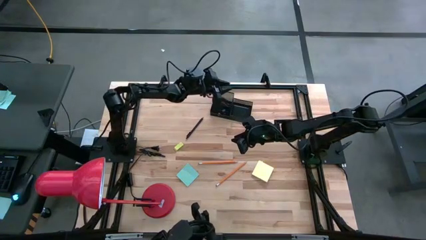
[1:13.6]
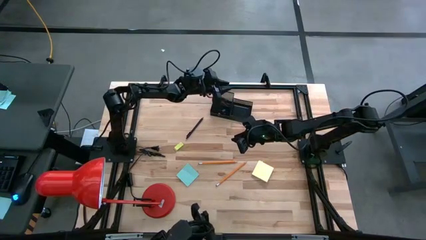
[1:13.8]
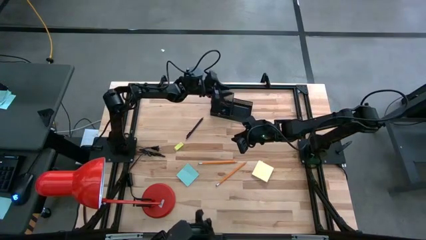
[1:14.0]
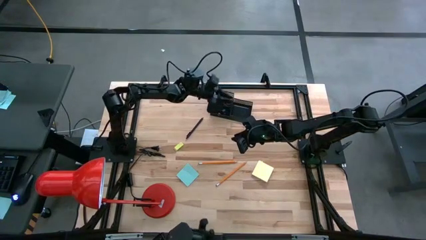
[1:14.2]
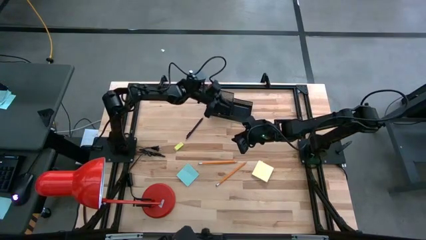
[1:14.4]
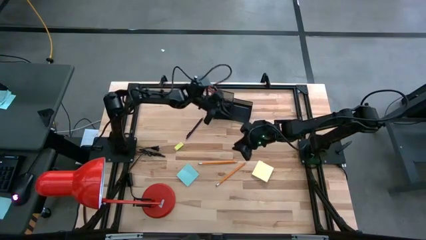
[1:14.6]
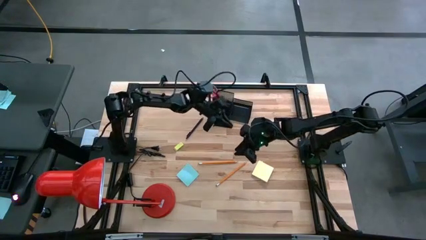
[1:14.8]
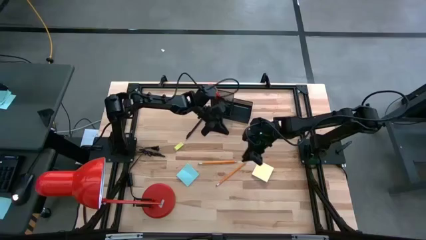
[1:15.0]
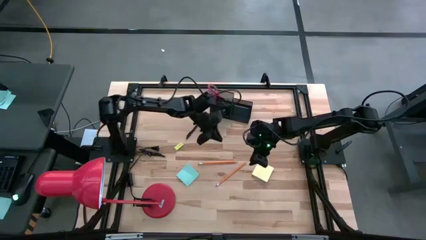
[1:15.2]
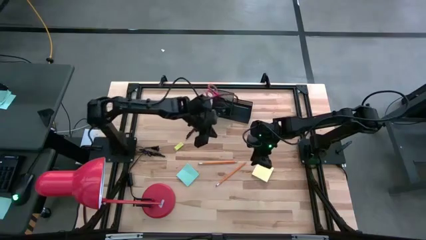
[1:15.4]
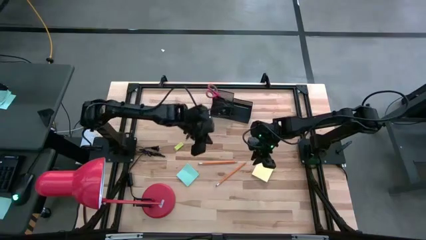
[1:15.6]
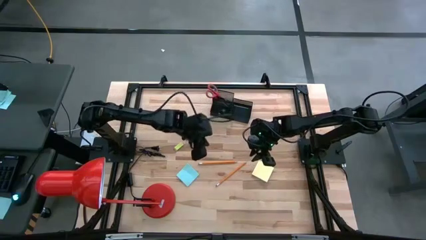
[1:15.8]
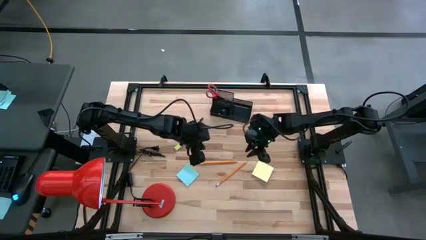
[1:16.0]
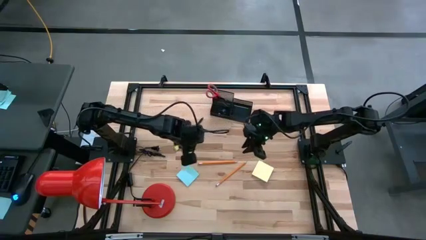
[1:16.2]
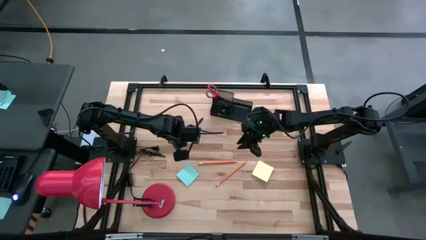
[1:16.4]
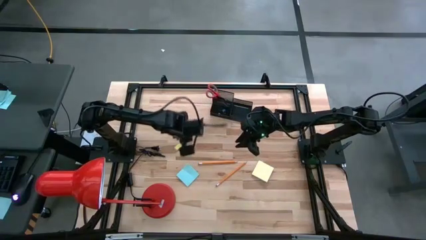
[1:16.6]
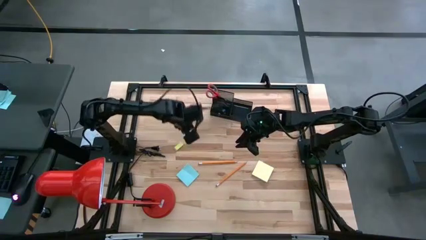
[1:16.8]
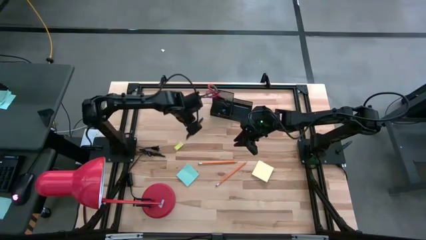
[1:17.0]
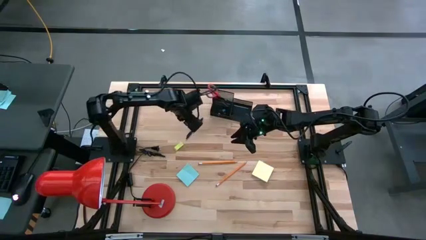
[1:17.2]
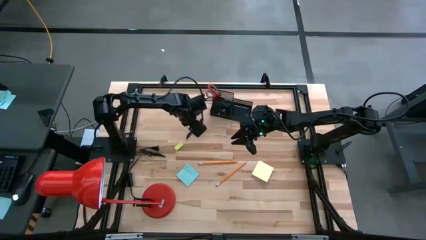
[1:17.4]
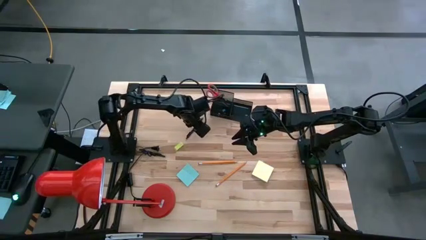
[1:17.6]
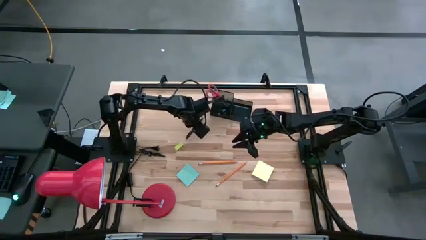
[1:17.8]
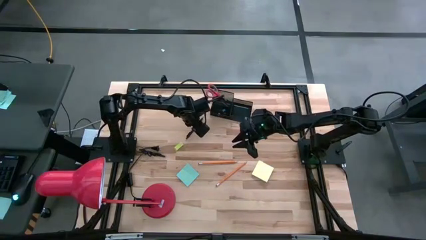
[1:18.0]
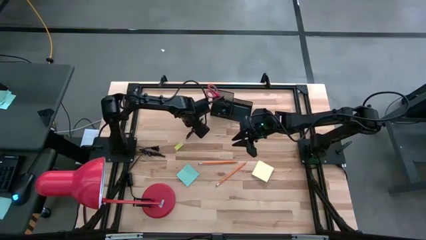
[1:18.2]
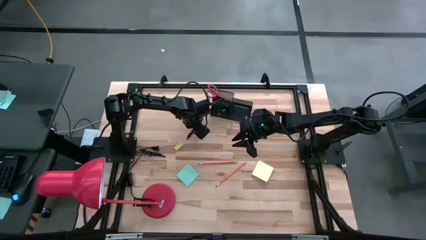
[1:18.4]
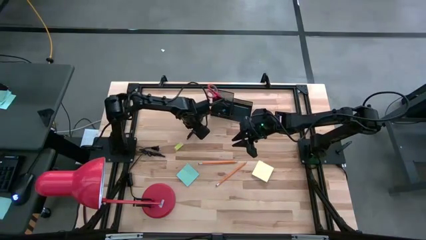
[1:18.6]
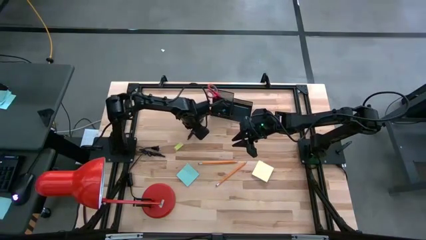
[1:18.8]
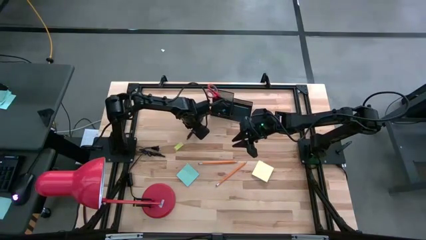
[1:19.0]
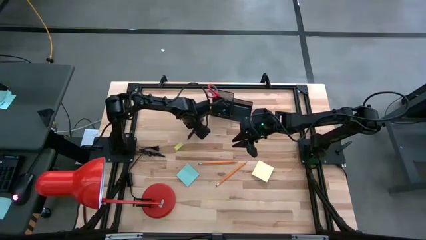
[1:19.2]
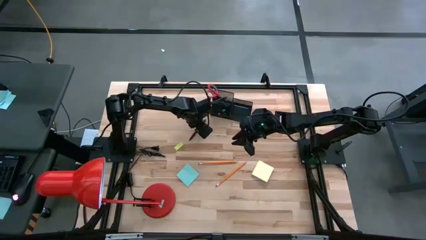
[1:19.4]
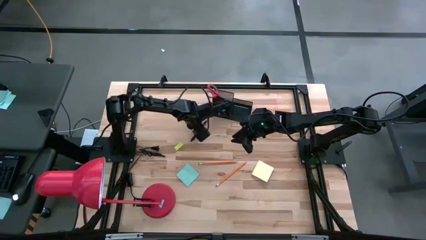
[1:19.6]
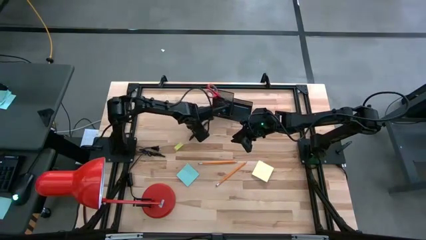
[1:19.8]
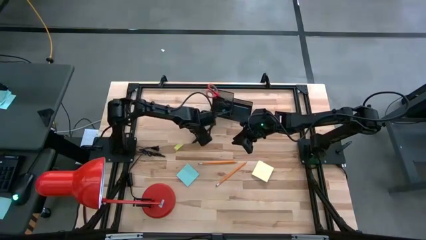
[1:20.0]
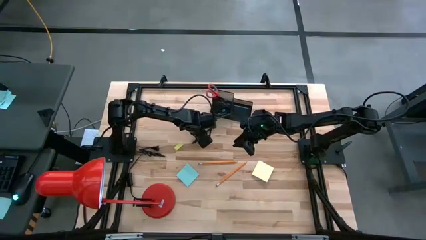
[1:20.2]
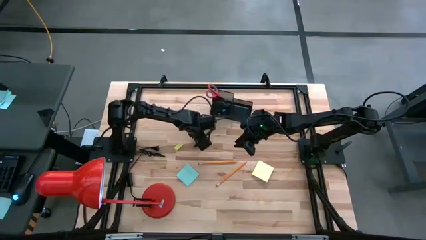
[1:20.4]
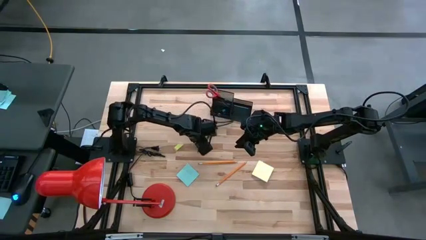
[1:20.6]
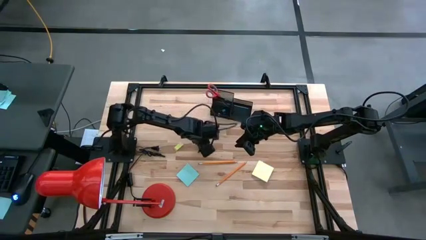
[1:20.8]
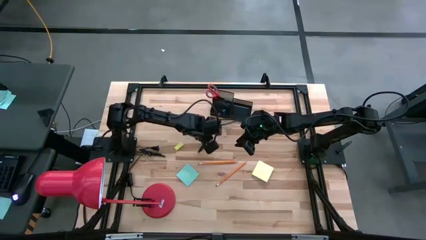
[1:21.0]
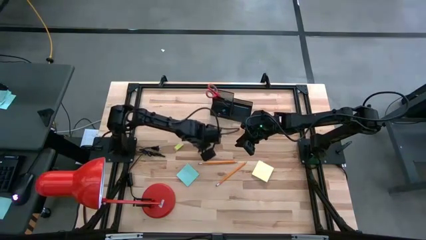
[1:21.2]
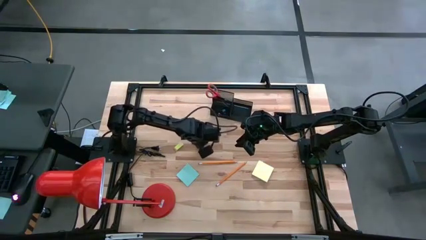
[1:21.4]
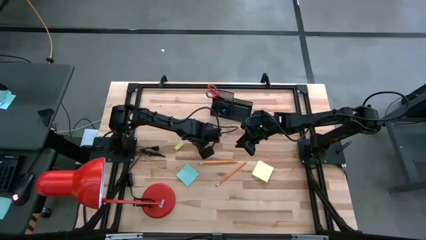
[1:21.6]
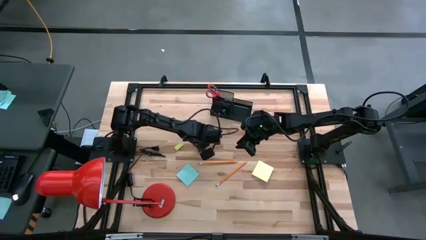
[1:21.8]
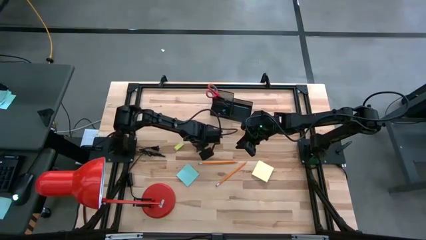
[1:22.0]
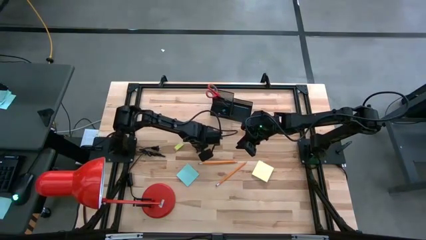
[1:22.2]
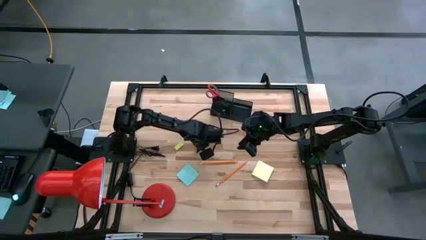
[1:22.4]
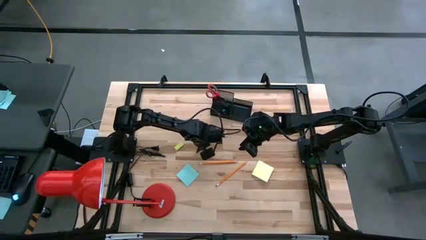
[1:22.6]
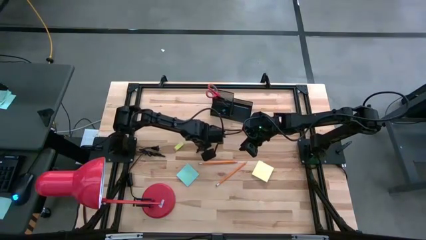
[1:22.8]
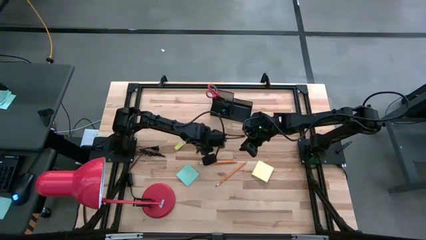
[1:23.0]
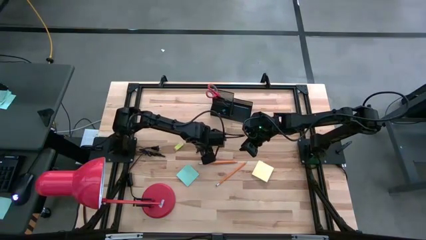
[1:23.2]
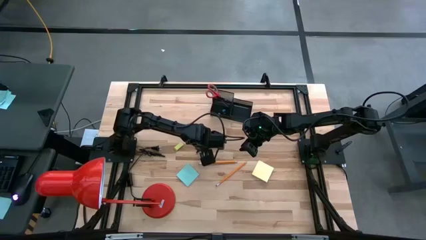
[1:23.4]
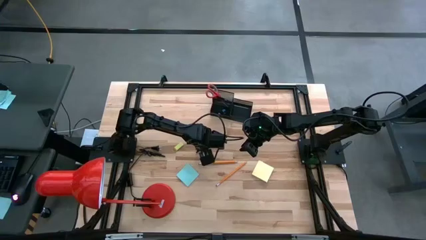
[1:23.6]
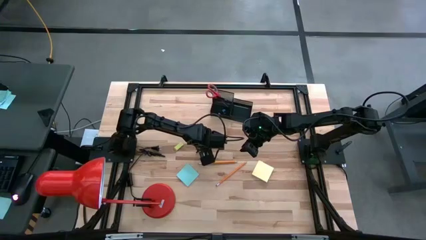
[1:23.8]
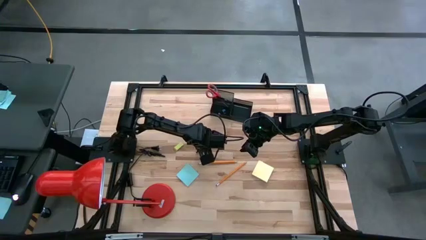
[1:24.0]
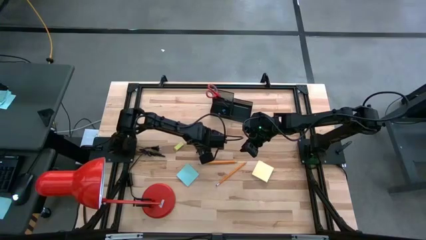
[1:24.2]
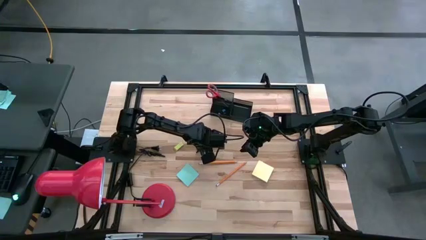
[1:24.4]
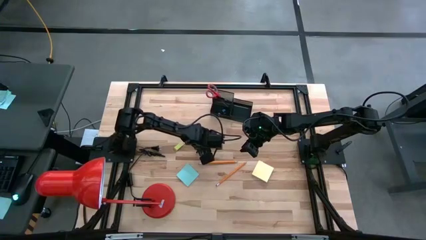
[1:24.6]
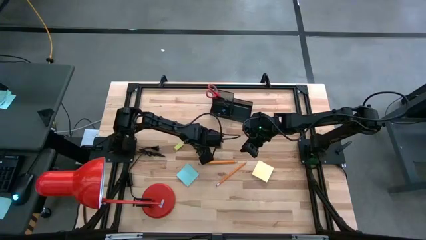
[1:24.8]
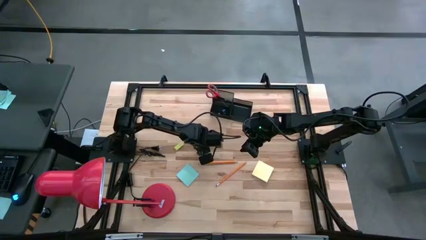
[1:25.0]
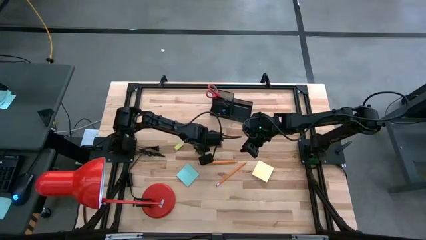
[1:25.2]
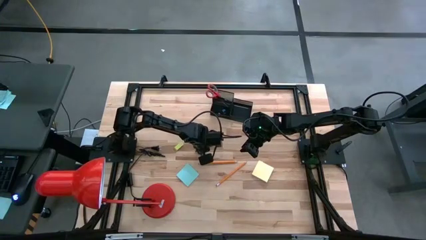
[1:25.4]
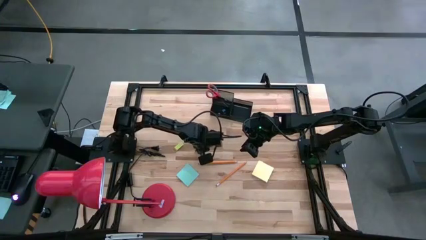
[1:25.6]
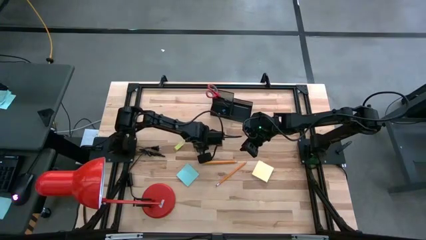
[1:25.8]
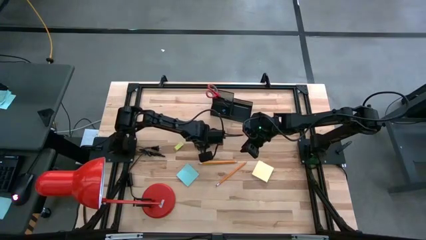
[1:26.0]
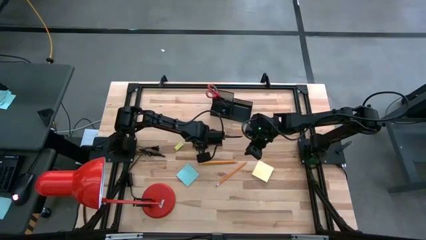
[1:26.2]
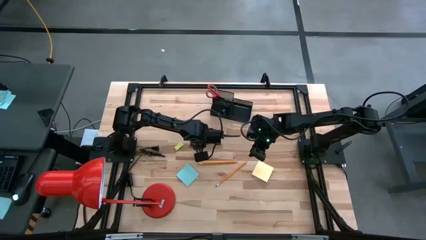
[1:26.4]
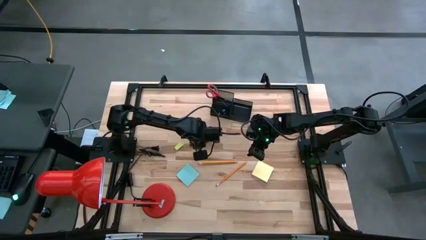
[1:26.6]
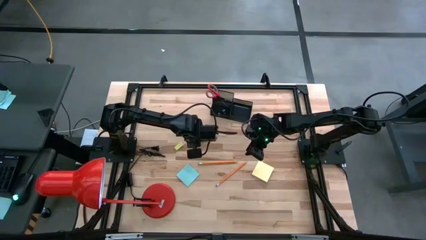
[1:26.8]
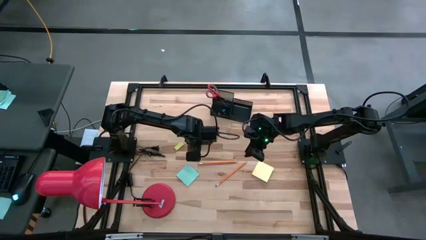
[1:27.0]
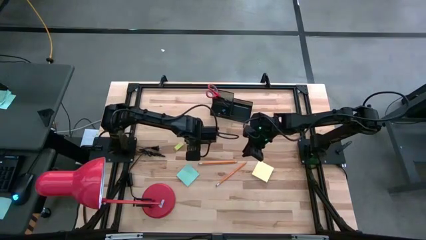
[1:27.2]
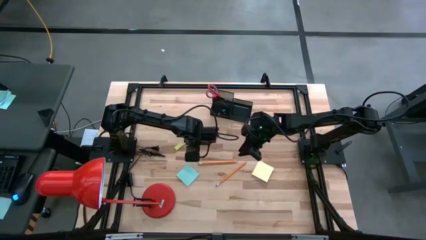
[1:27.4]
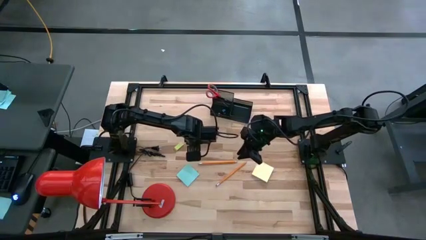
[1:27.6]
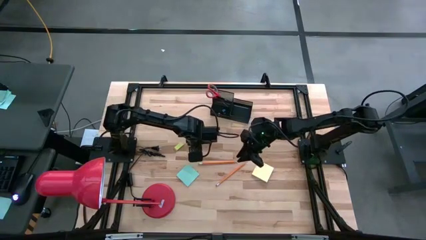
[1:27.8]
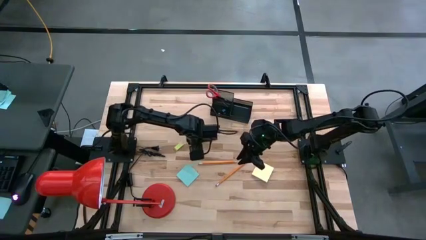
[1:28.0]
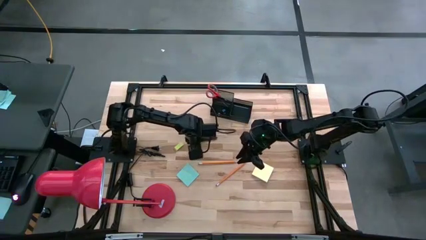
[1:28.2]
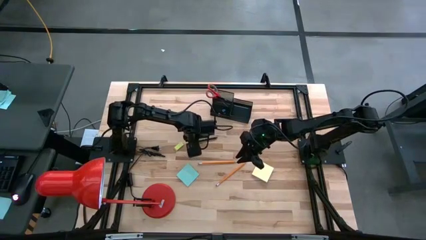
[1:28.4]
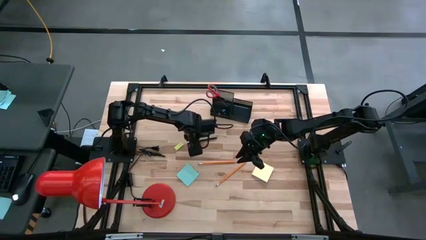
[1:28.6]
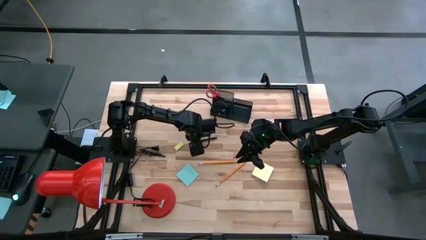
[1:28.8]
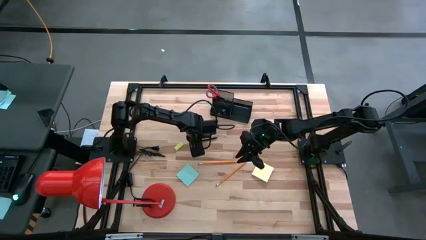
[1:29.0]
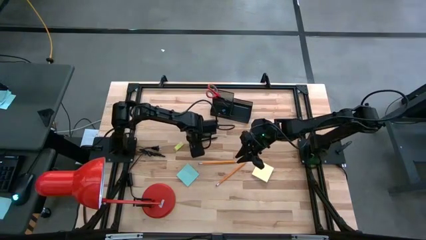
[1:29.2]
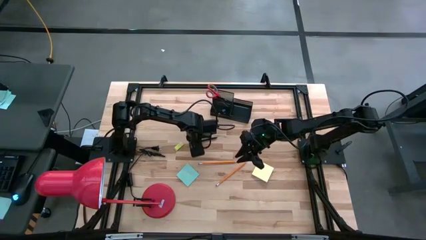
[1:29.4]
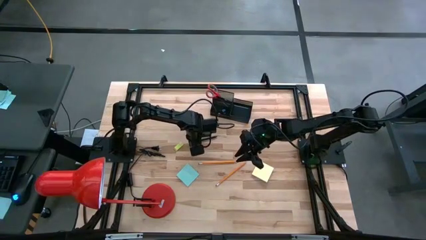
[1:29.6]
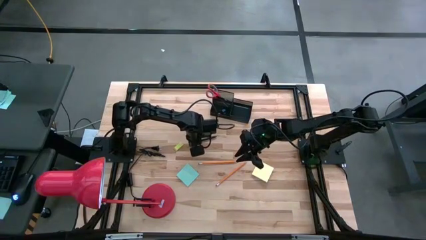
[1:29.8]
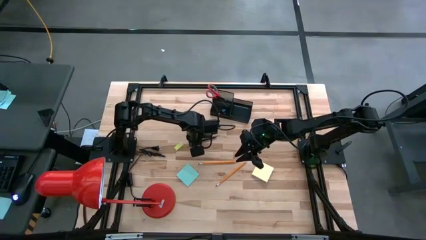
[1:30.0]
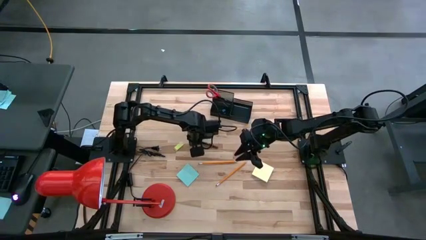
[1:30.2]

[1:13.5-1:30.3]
Task: Pick and place office supplies into organizer
Put the black pen in the black desk organizer
